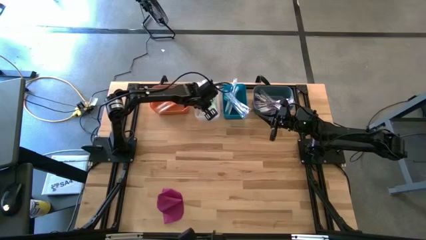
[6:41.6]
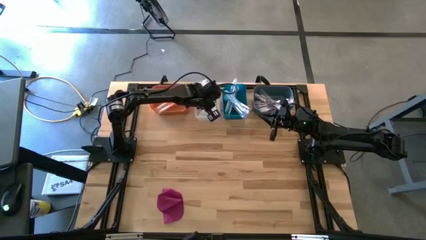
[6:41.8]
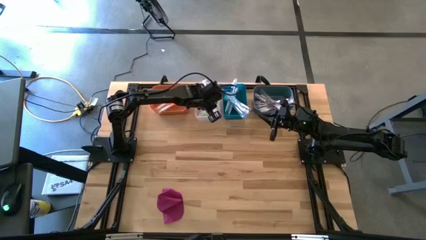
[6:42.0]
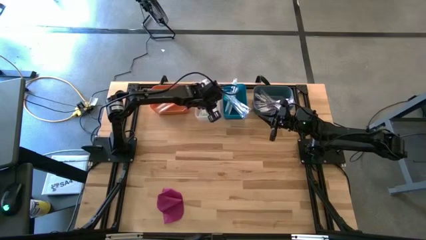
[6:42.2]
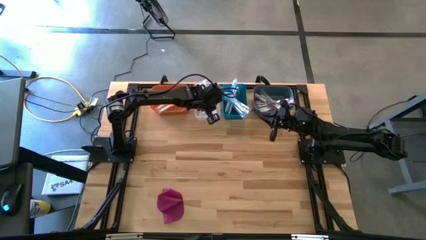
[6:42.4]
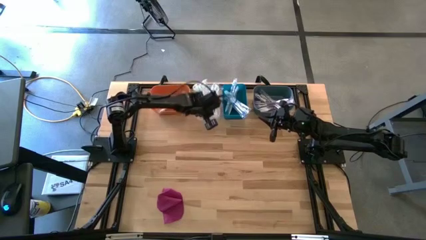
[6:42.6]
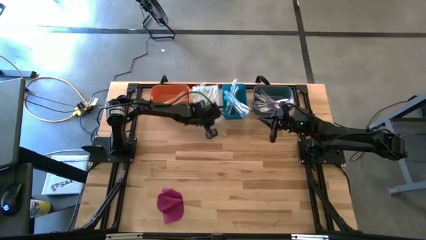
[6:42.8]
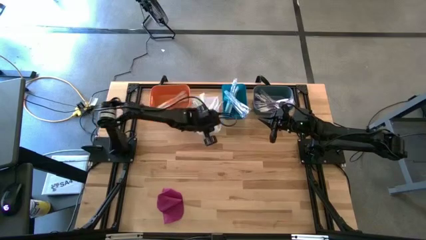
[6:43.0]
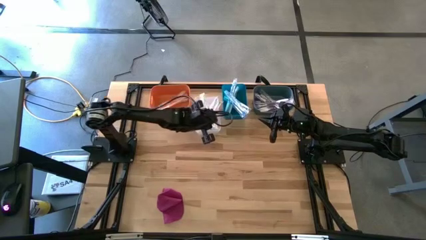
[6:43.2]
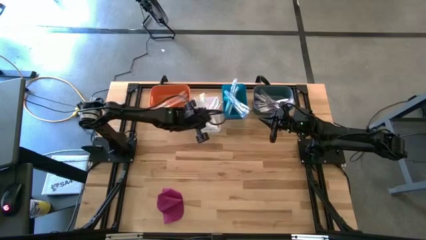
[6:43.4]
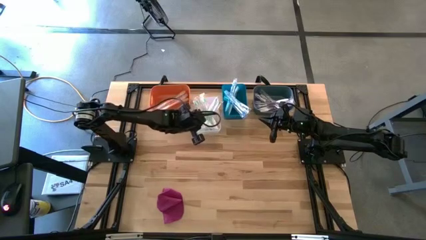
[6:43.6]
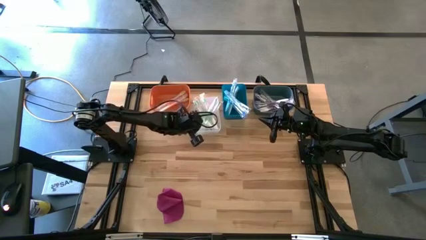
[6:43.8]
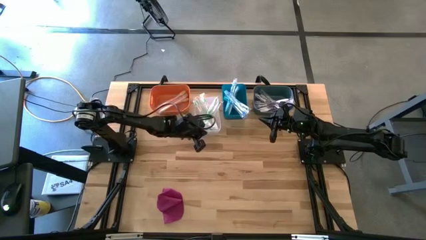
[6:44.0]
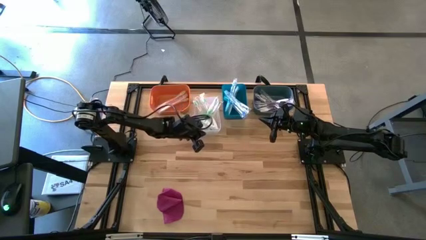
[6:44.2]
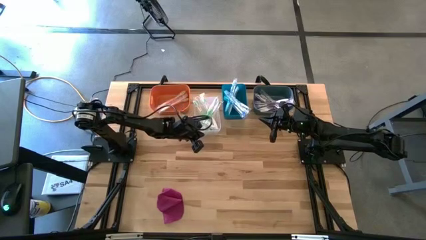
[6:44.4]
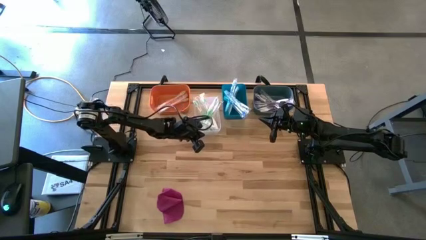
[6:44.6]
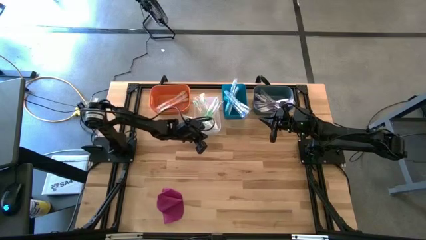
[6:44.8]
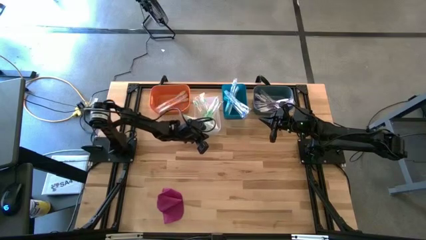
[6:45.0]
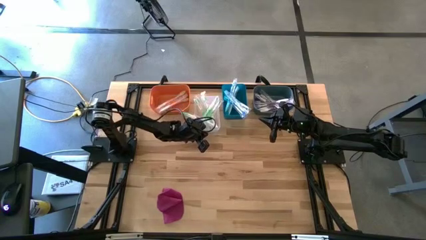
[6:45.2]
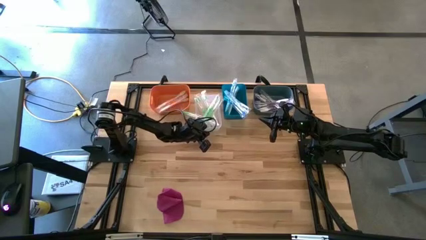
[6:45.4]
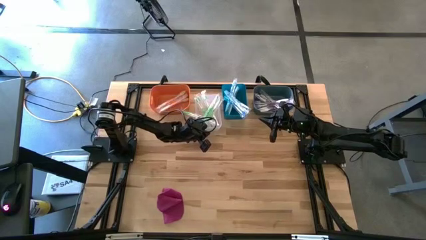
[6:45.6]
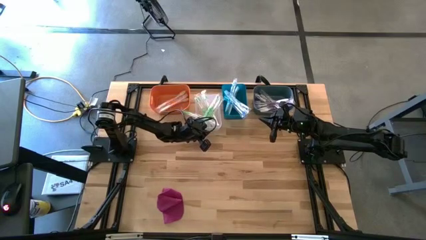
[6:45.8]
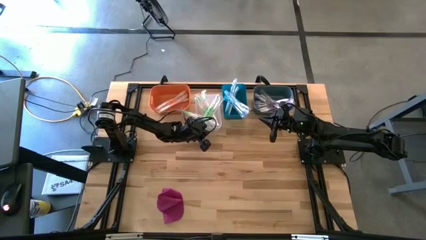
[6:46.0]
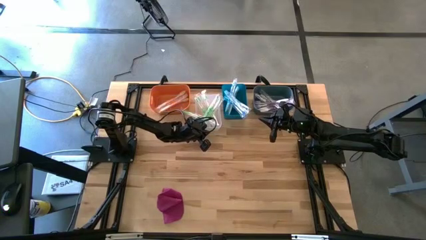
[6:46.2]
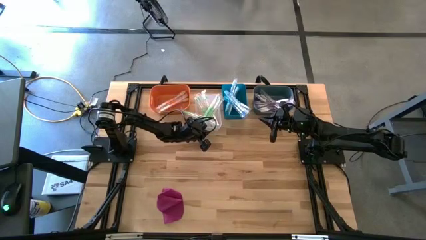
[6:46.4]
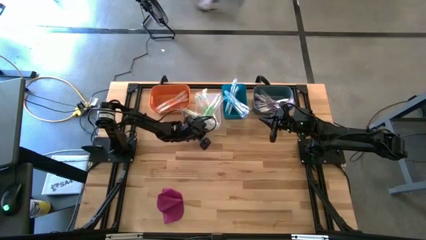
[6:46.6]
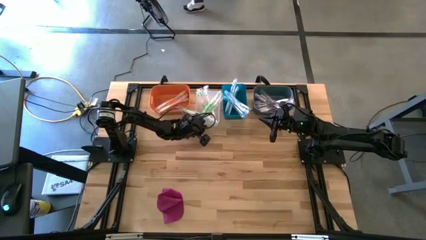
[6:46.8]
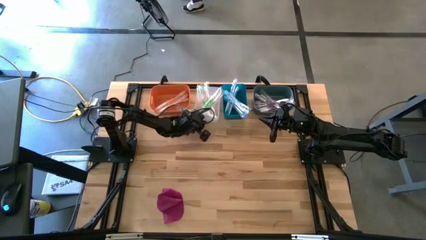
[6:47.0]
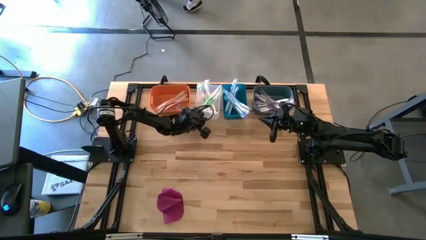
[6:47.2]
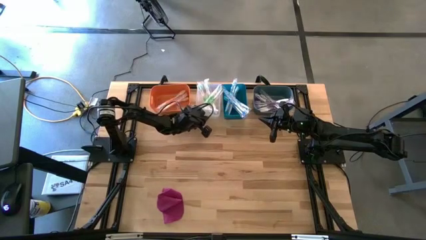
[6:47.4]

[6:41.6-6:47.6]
Task: Pick & Place Toothbrushes
Adjust the transparent bin

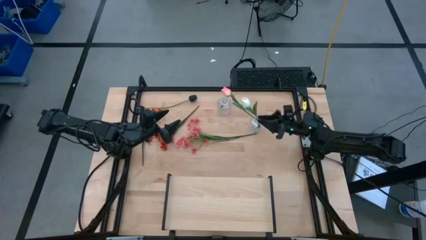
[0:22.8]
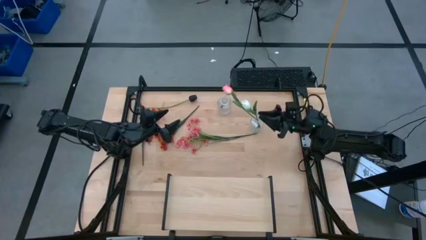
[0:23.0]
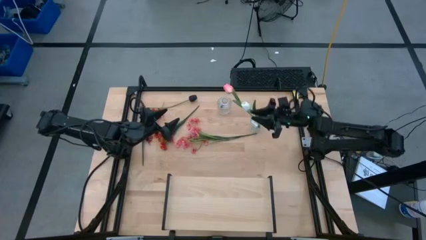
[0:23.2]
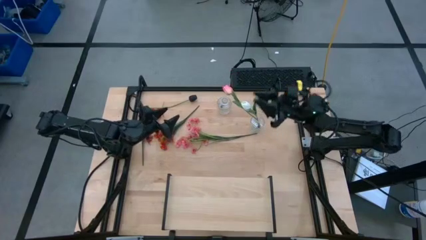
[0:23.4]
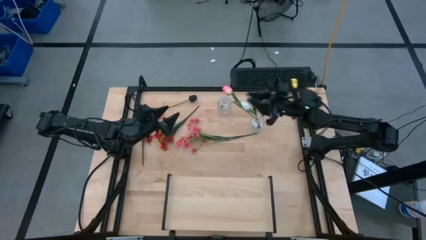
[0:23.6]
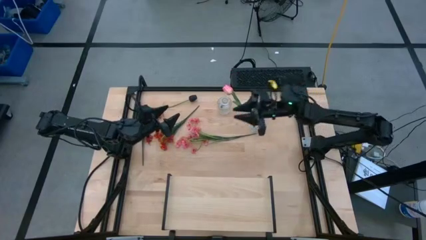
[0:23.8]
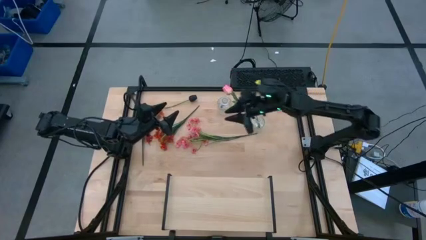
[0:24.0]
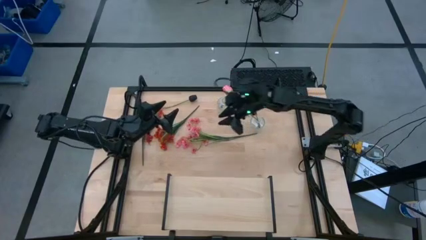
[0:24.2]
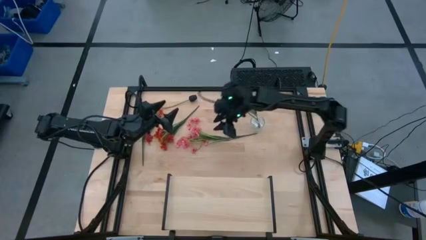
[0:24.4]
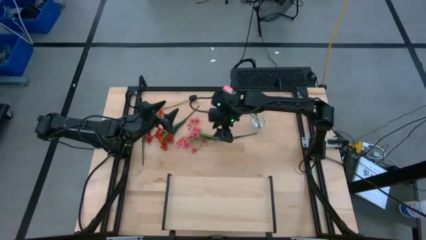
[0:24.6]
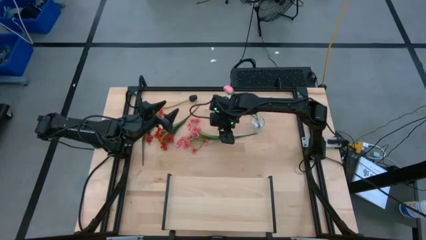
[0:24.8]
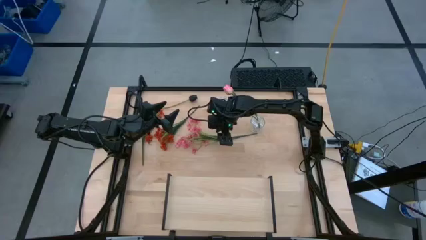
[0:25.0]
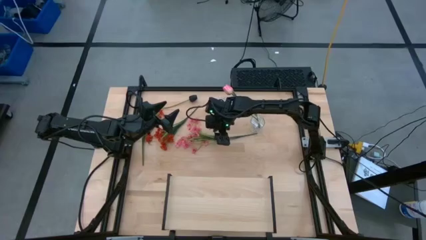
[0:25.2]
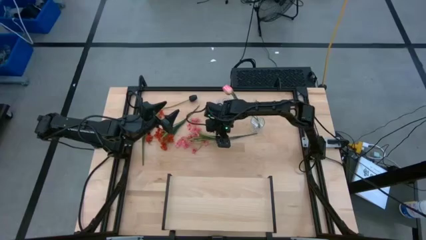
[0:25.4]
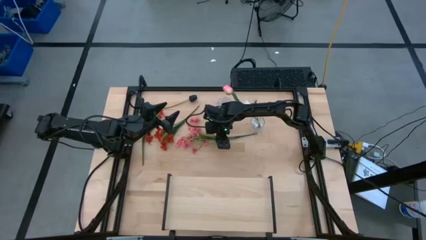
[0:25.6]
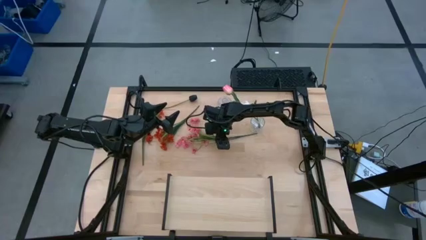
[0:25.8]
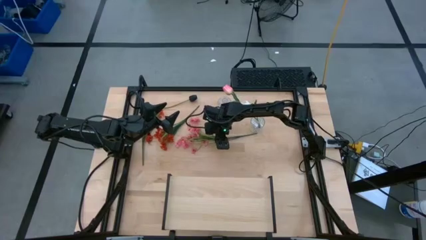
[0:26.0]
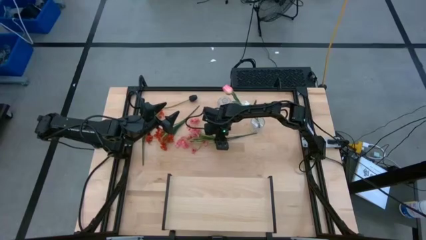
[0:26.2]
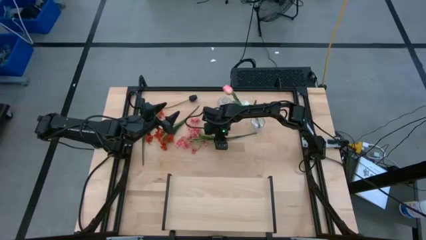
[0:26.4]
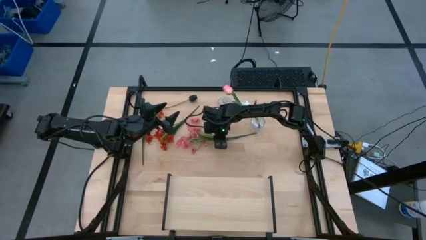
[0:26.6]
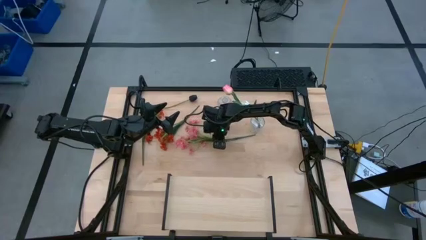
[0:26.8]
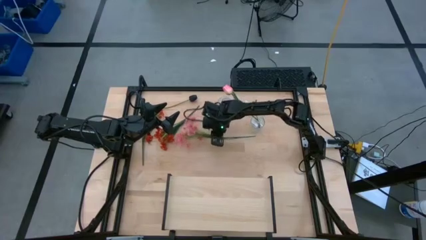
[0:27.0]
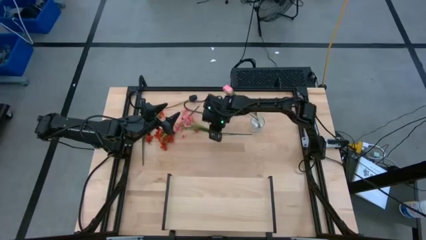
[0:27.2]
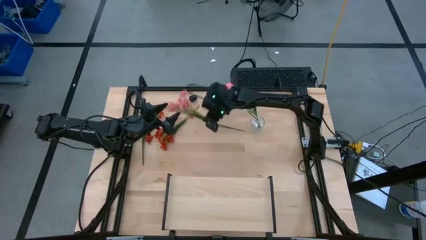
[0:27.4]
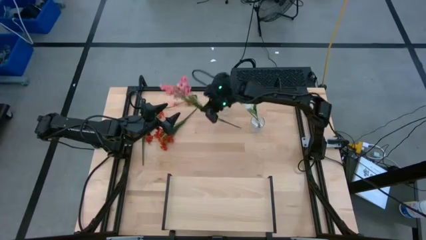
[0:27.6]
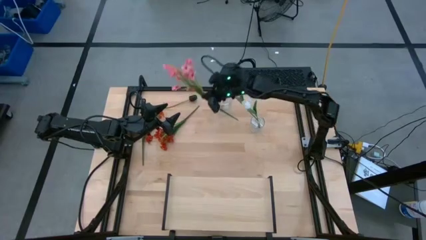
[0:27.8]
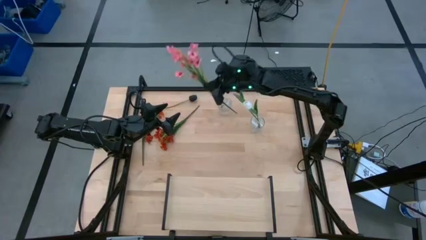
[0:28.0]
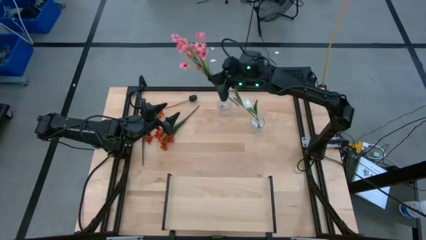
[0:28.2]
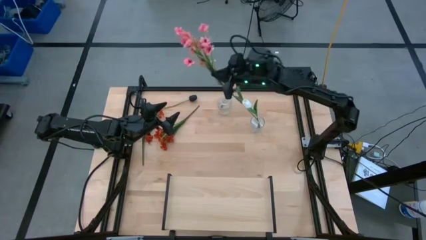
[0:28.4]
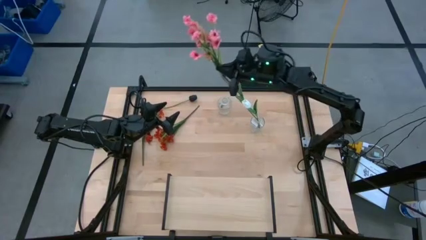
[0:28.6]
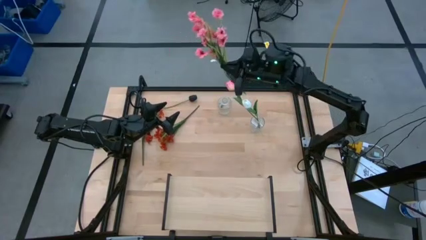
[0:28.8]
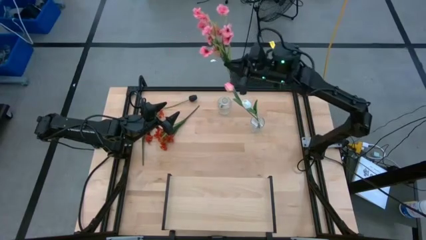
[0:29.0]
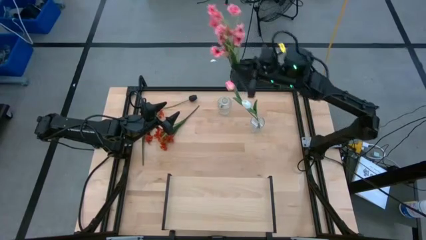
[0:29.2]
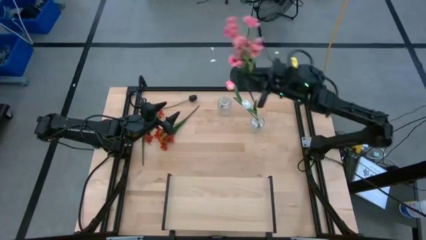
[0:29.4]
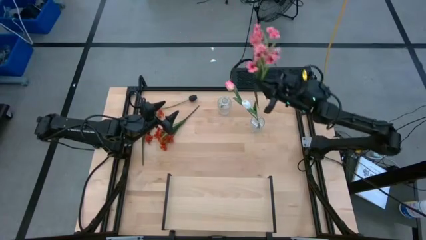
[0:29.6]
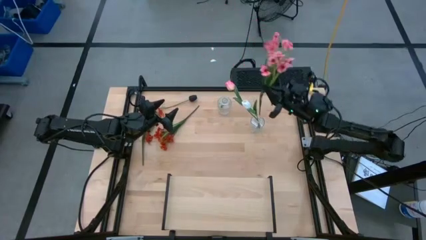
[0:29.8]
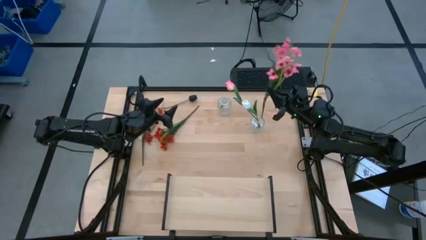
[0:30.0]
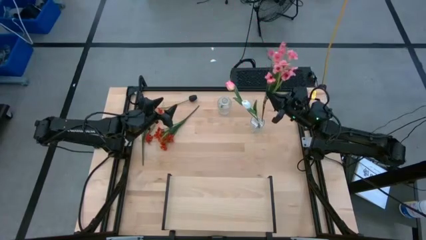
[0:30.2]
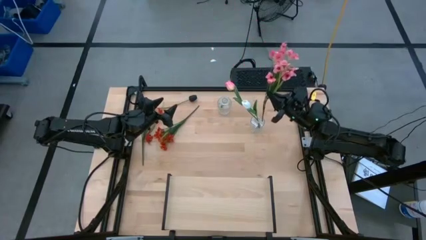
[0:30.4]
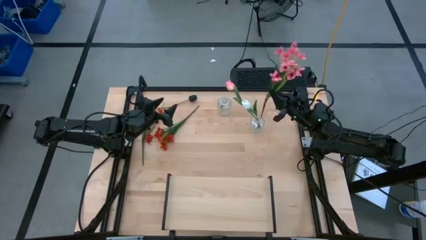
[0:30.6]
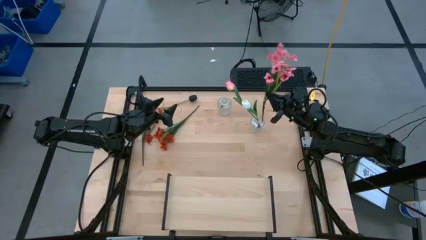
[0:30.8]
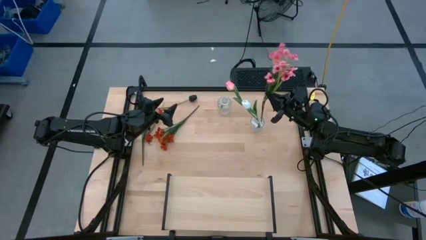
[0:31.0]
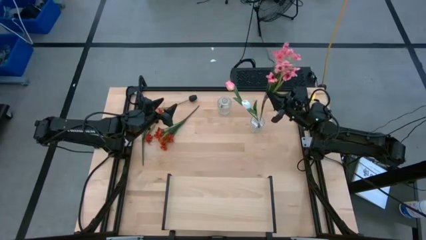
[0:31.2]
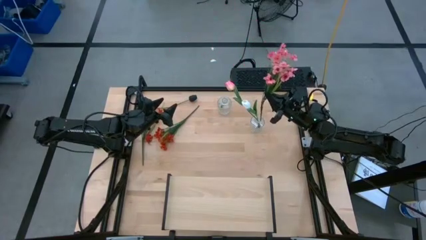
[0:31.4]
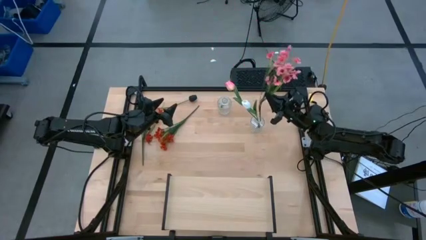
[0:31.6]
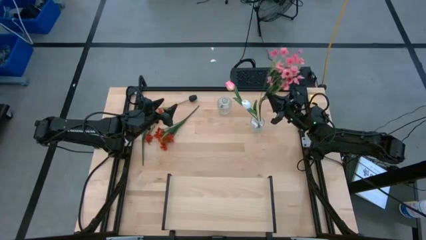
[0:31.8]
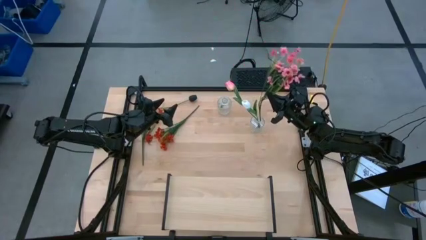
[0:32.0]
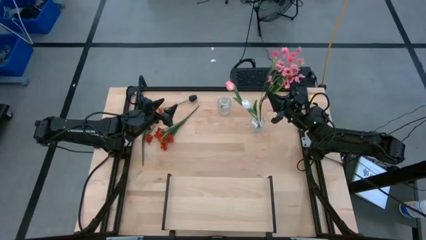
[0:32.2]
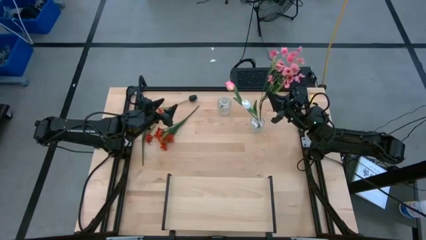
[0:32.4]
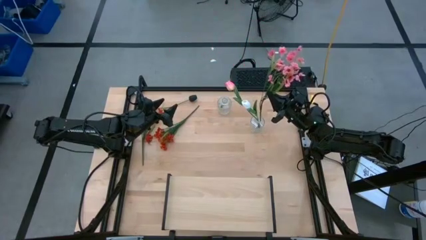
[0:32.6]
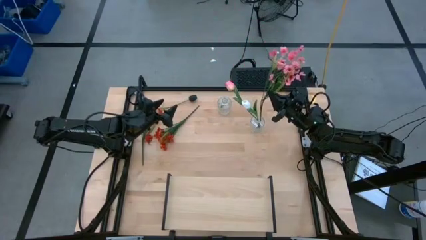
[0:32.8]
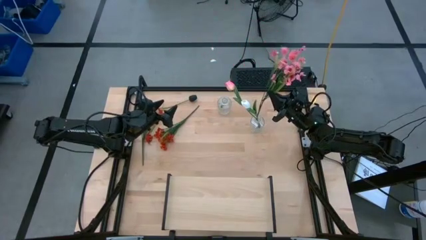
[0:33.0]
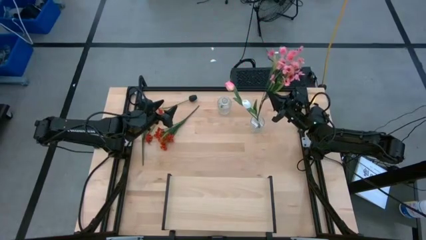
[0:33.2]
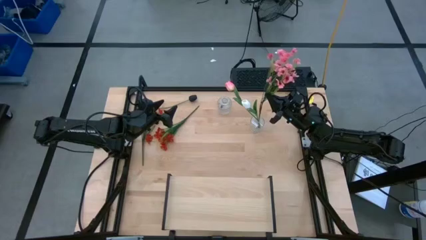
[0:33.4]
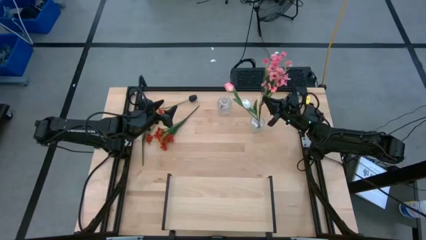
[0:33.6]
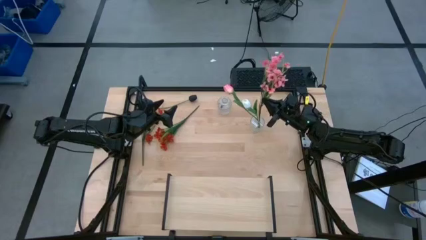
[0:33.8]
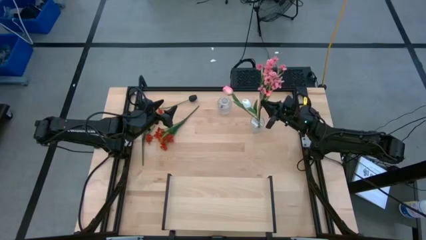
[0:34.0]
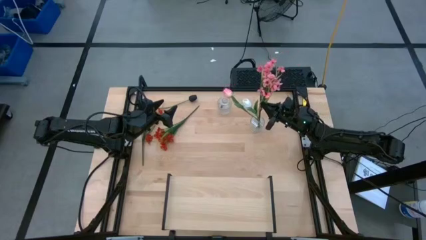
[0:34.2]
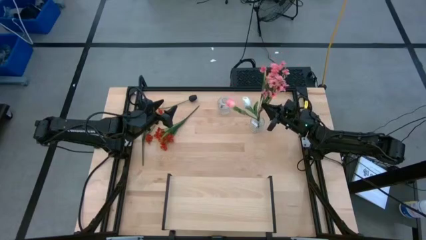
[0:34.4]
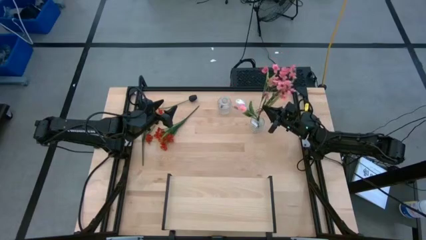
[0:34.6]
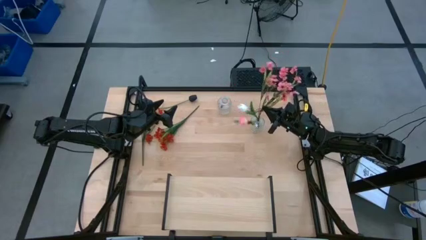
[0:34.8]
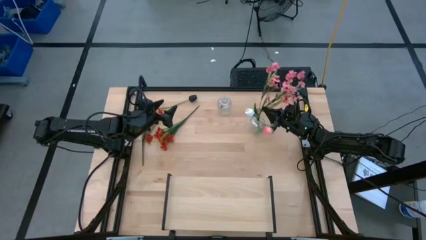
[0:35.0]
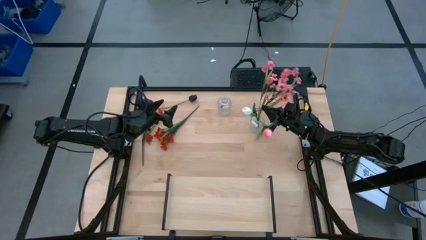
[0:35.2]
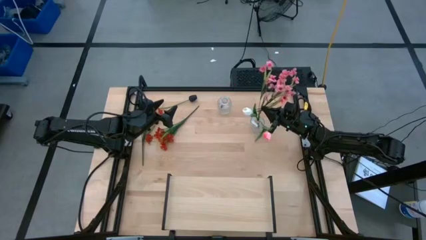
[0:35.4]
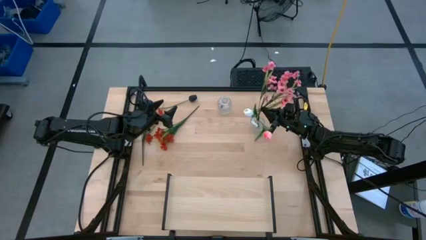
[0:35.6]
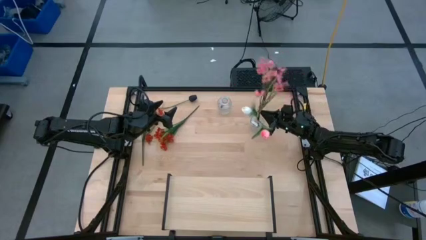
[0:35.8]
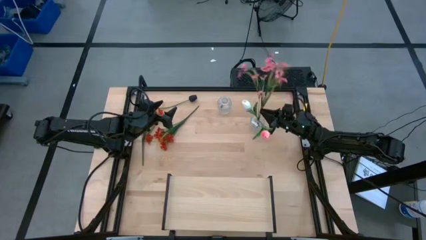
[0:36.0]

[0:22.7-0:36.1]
Task: Pick and place flowers into a vace then onto a shelf
Put the pink flowers into the right transparent vase
